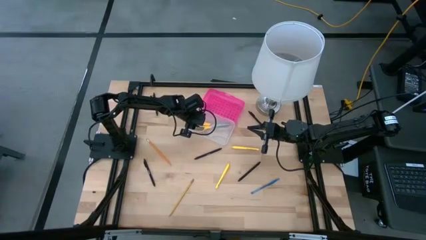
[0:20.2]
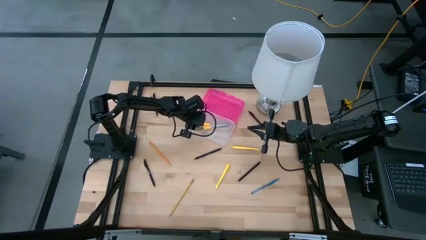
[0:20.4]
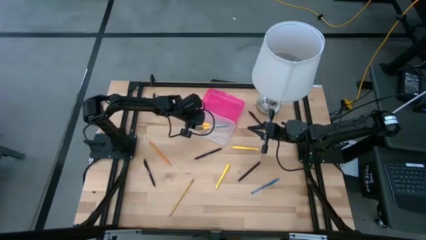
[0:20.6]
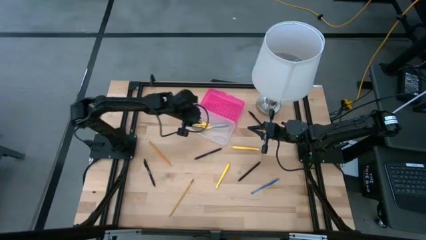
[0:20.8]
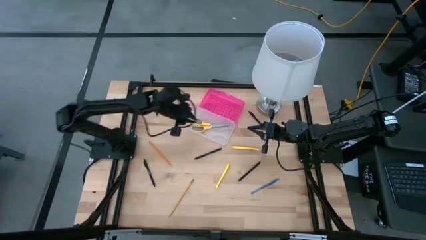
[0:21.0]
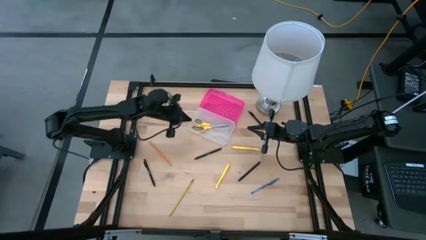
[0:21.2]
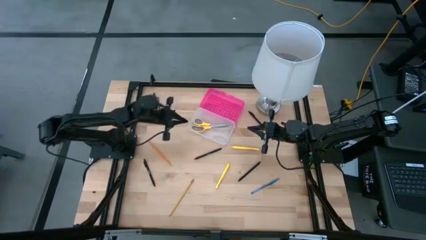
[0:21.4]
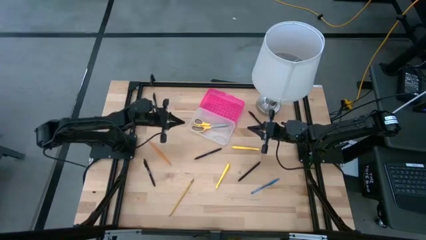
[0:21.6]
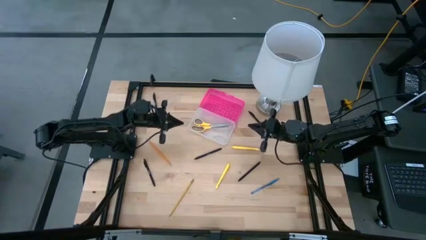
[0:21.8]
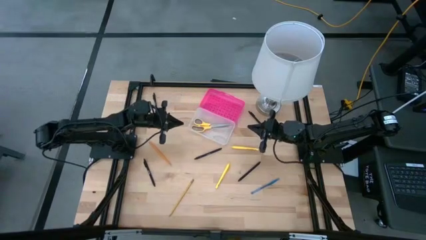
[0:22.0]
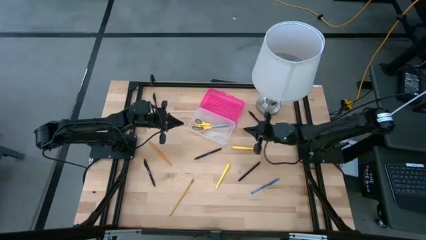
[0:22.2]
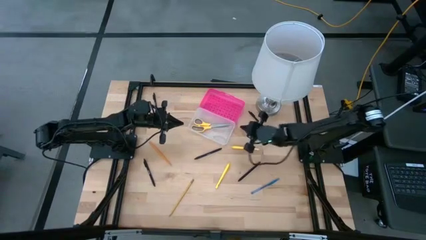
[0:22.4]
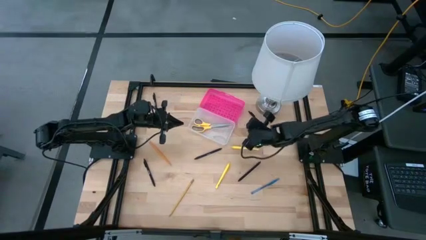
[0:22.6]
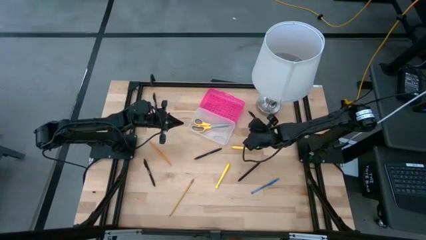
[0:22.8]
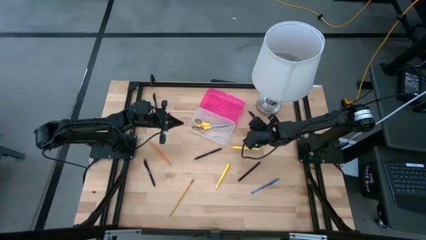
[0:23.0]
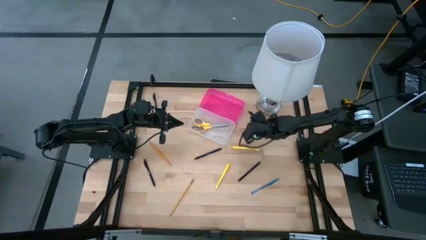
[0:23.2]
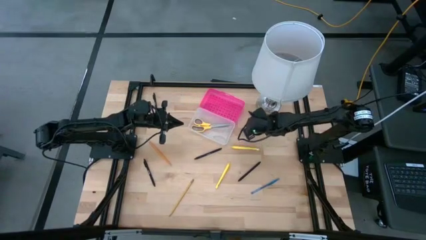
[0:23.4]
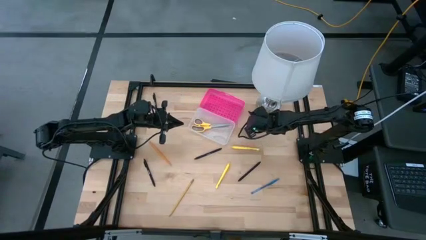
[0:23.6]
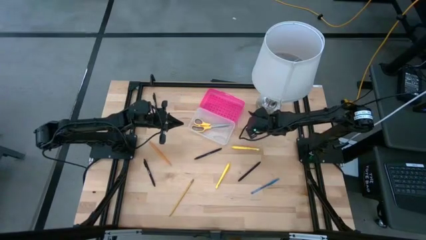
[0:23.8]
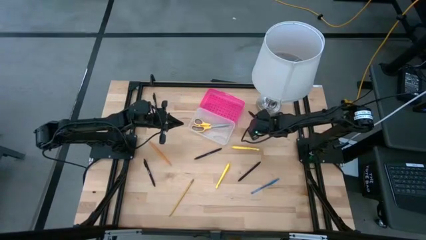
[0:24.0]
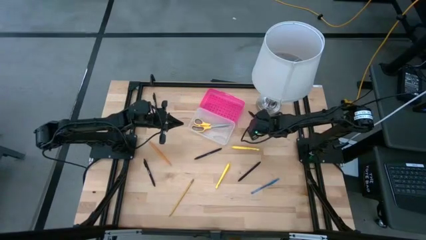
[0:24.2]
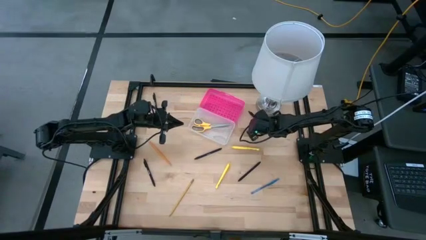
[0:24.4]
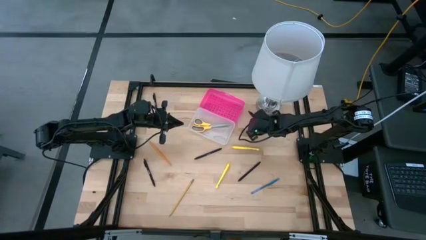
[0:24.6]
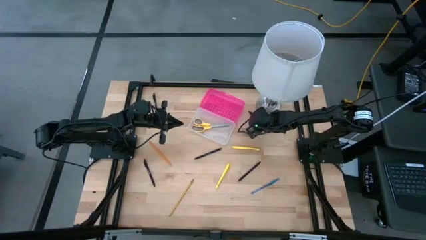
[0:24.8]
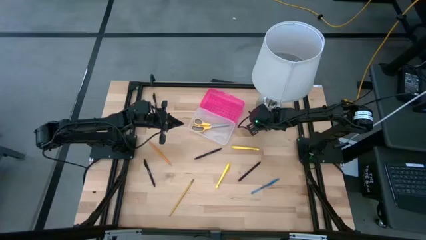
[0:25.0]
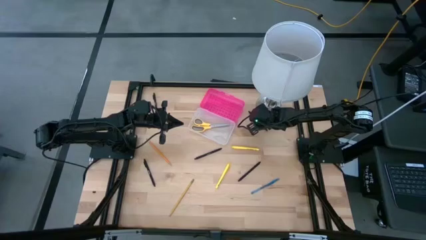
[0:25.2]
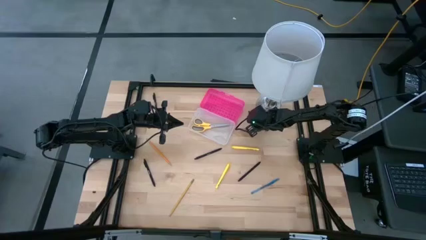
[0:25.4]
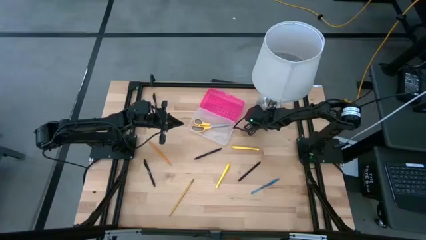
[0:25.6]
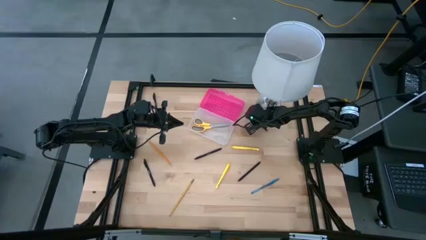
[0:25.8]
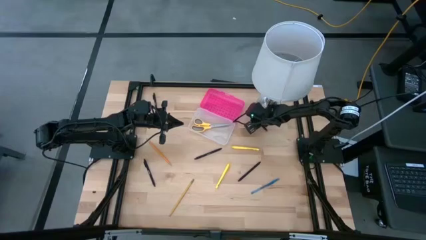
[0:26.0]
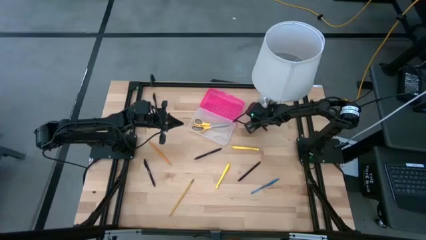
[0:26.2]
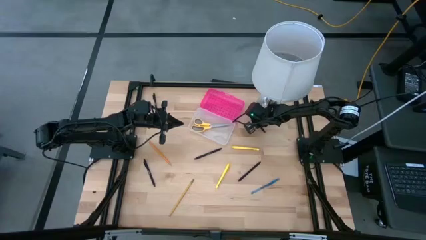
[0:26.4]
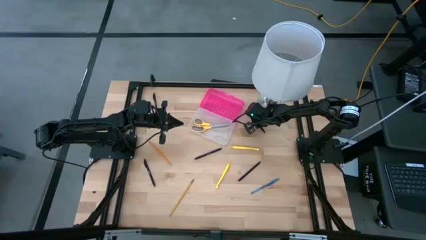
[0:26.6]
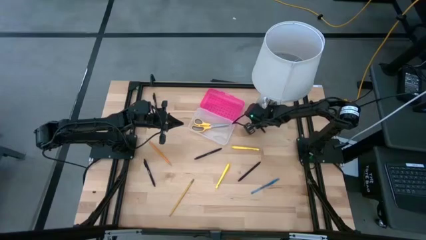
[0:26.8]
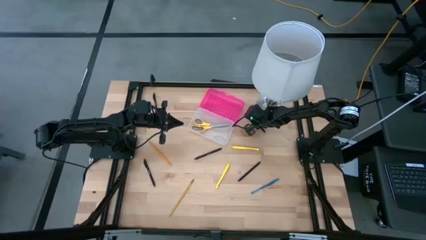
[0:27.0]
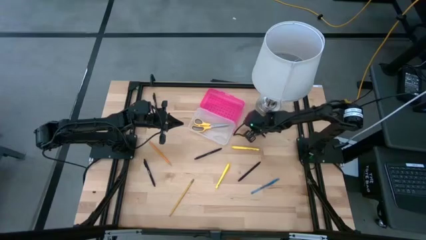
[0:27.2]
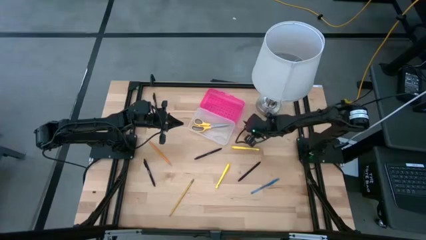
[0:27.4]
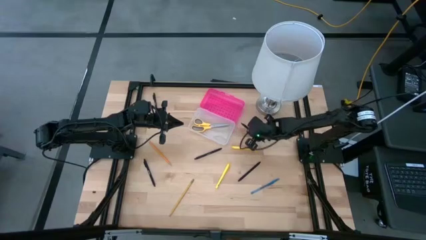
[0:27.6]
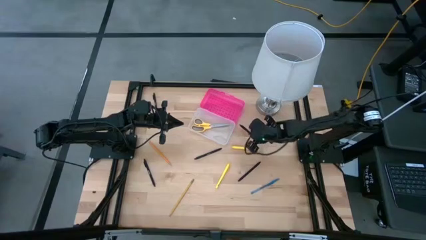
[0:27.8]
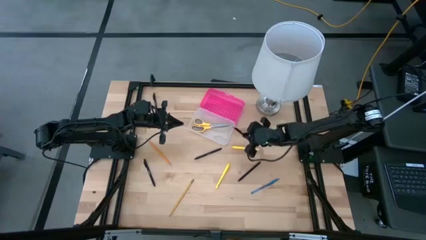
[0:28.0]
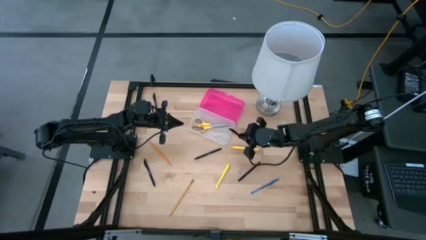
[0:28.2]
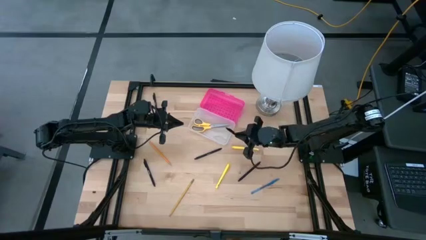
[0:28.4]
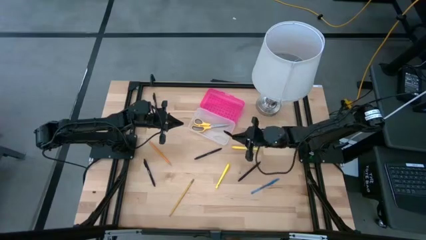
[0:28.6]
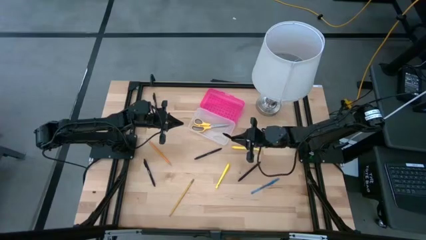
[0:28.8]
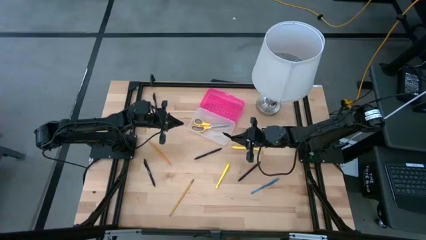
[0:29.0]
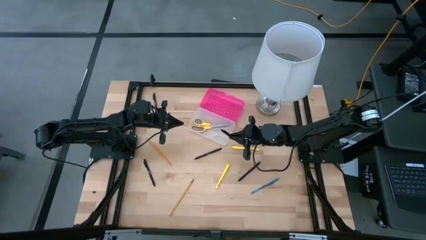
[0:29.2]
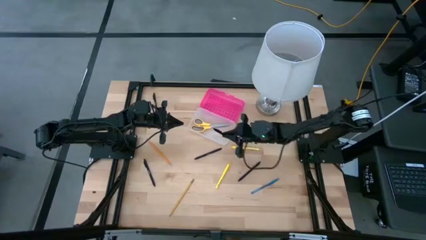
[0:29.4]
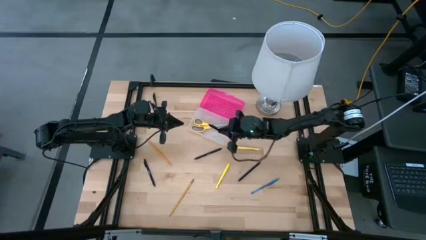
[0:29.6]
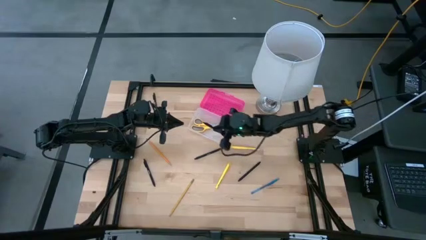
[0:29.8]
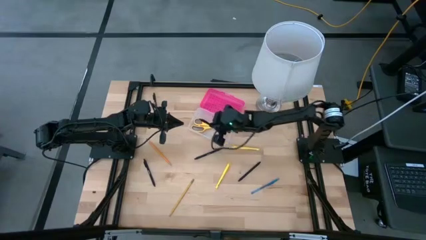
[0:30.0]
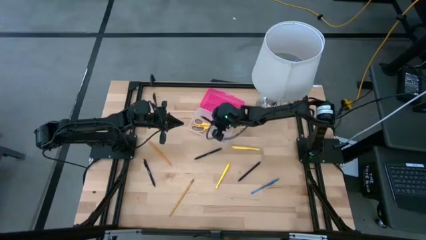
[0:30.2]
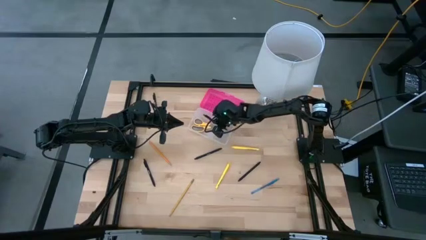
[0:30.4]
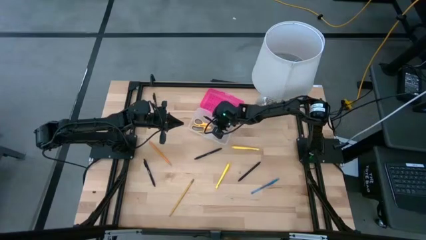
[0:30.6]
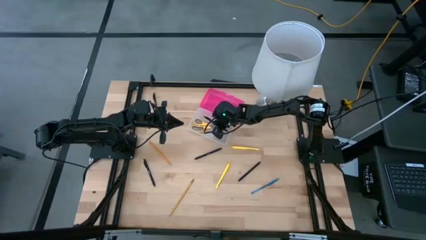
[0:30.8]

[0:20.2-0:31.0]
Task: Pick & place school supplies into a supply box
Put the black pen into the pink supply box

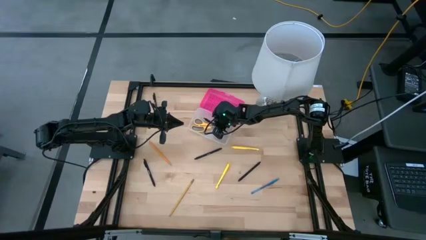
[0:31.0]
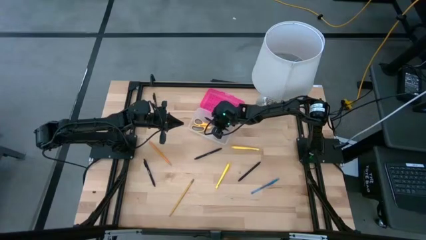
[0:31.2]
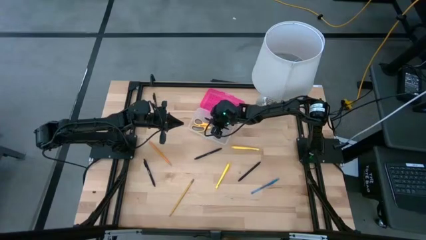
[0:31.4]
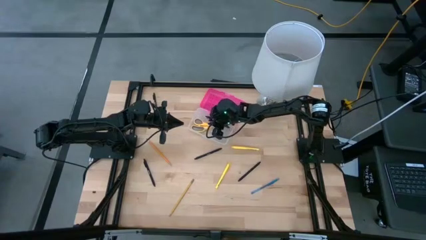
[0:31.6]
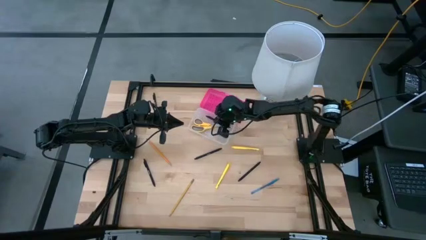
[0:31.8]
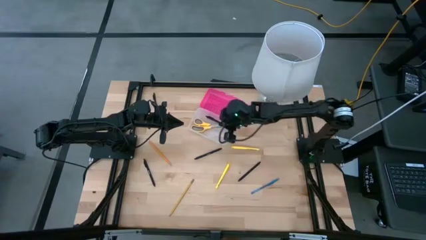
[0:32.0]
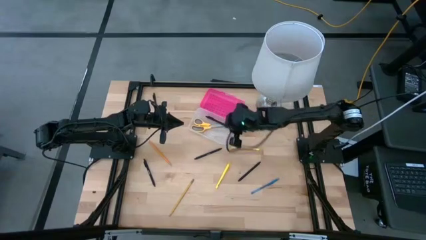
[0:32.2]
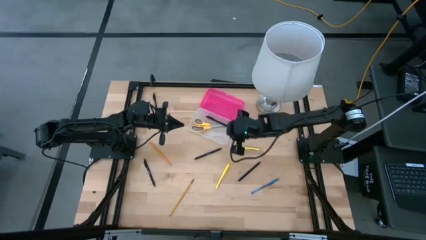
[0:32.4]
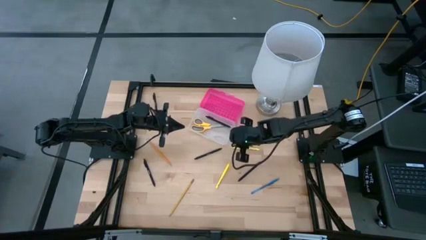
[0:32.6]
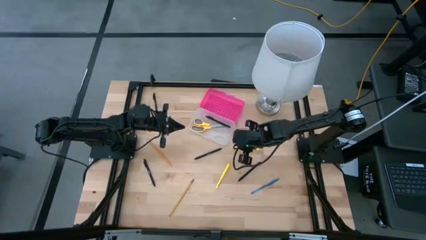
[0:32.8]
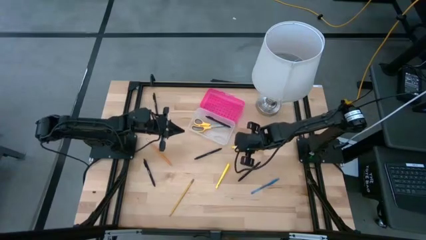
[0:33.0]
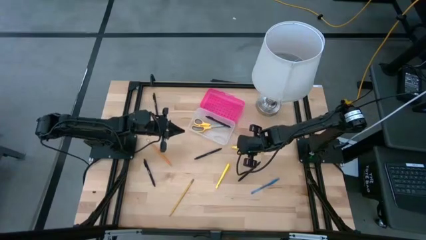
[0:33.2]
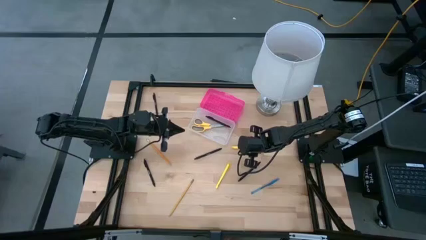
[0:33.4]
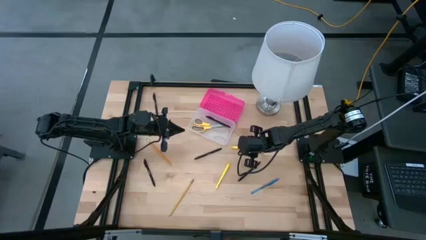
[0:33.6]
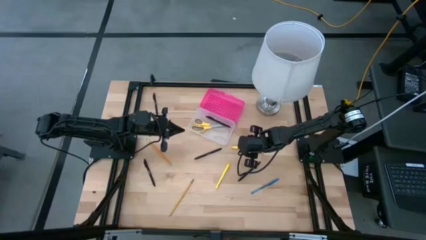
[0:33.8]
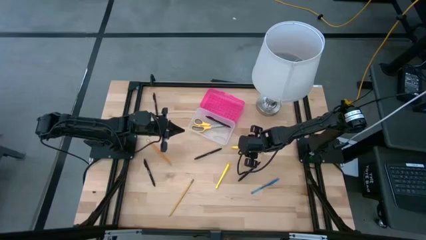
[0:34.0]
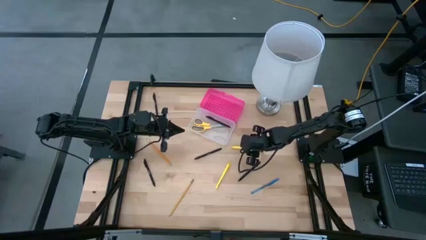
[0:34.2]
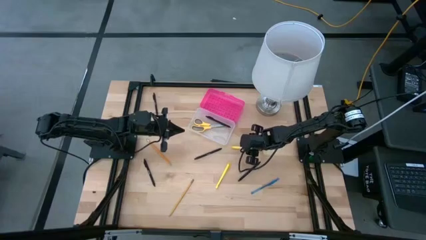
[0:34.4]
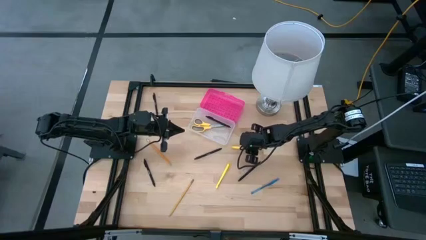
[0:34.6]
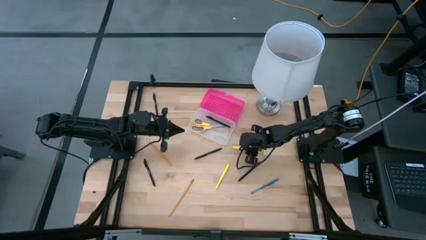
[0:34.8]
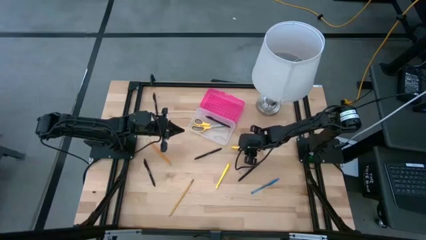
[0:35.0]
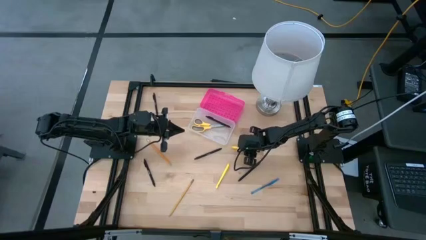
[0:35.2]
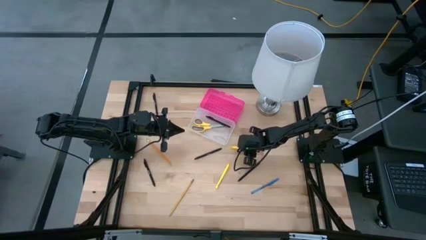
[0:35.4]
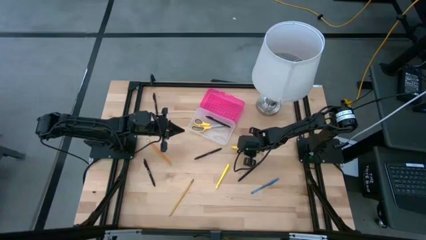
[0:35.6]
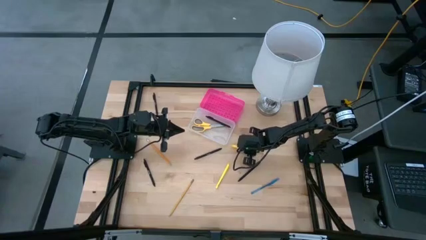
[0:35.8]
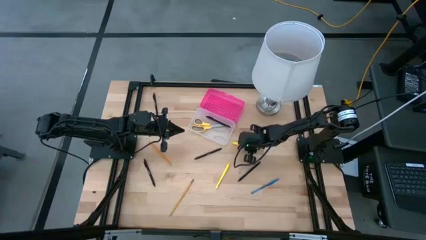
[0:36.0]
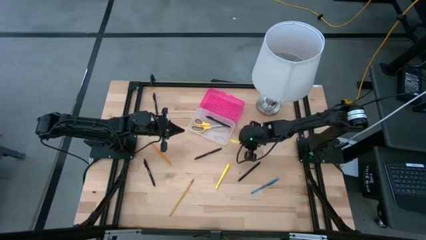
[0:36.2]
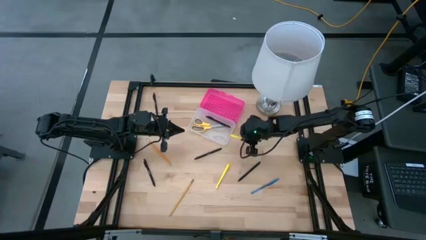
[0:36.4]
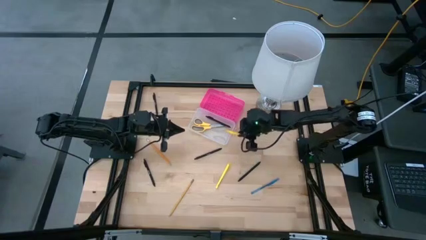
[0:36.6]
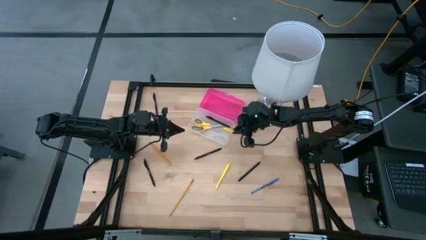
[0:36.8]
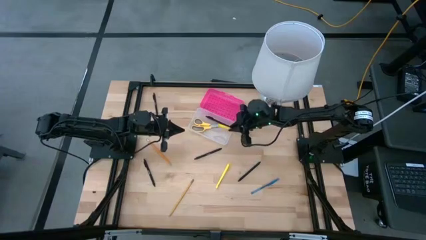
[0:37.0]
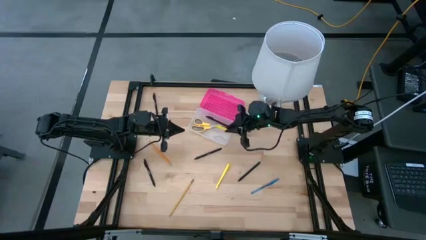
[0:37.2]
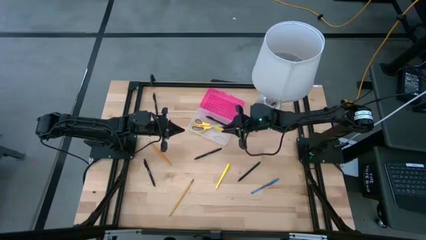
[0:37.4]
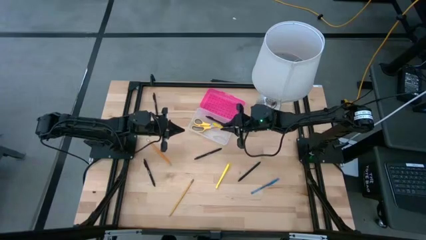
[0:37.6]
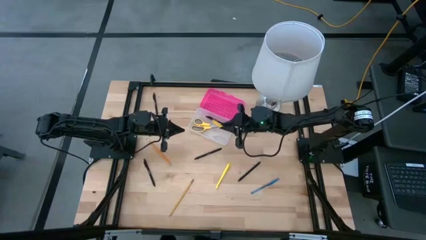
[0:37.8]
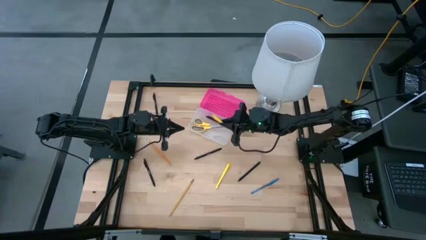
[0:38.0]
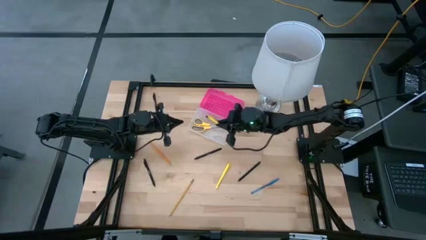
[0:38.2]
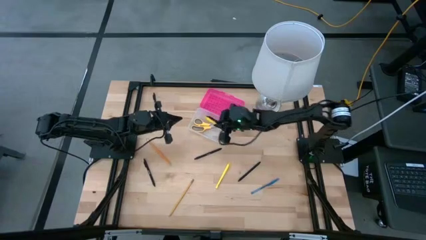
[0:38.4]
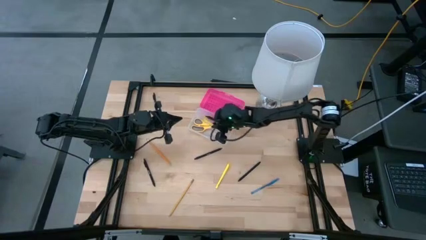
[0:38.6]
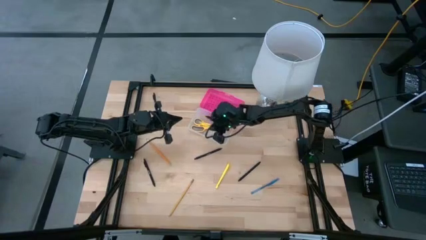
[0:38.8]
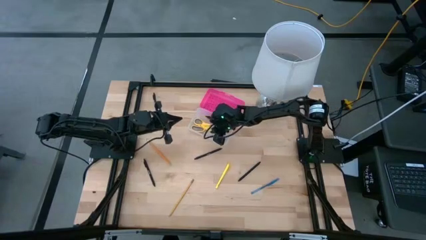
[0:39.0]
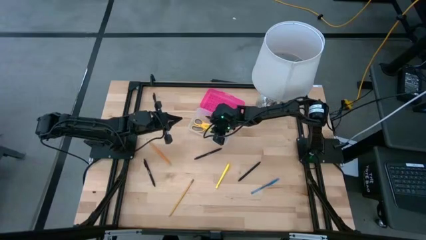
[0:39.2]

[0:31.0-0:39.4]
Put the yellow pen into the pink supply box
